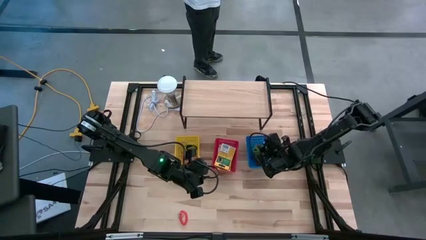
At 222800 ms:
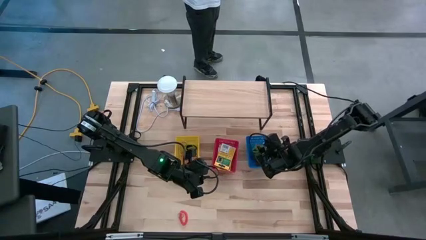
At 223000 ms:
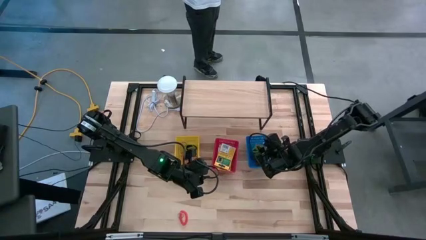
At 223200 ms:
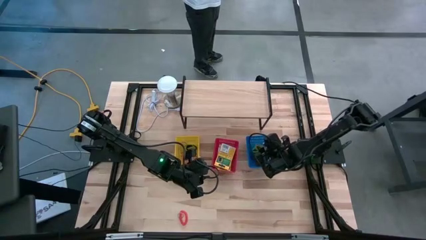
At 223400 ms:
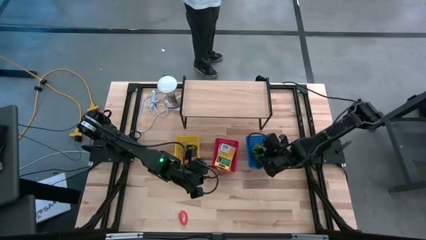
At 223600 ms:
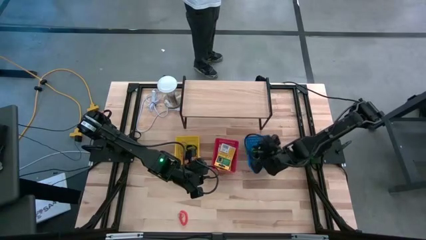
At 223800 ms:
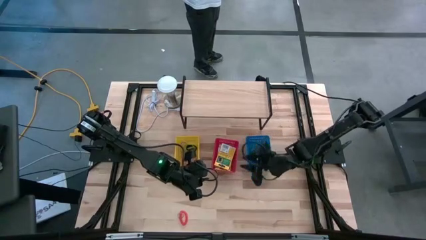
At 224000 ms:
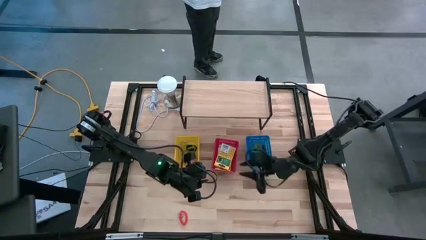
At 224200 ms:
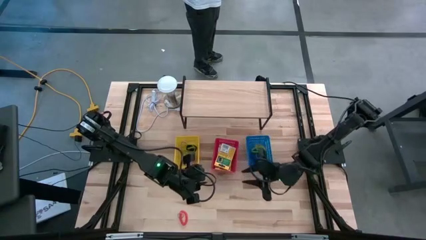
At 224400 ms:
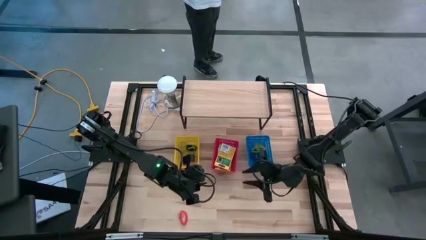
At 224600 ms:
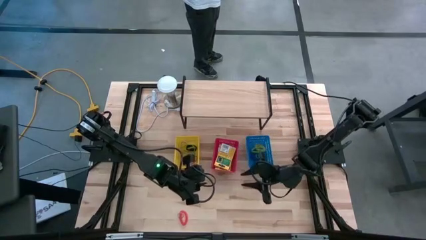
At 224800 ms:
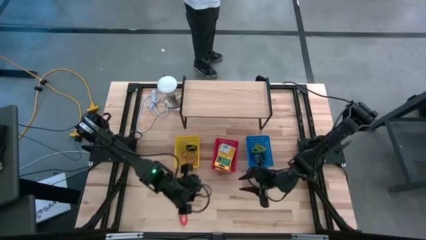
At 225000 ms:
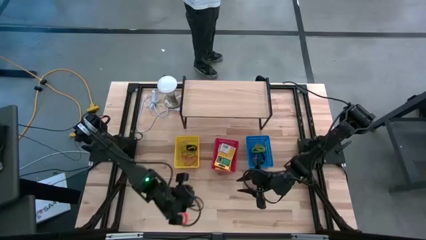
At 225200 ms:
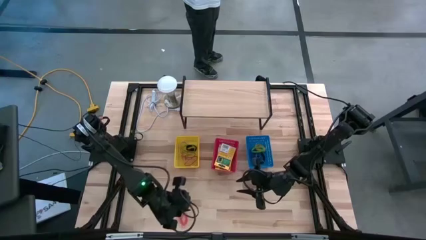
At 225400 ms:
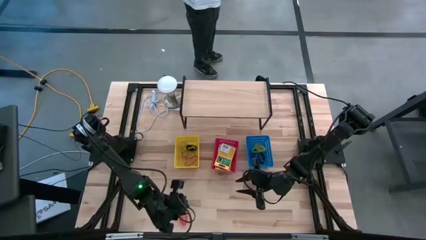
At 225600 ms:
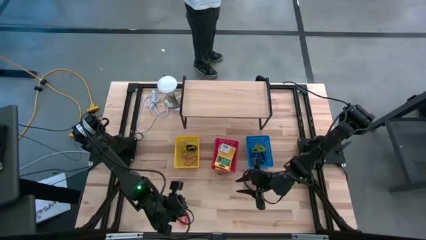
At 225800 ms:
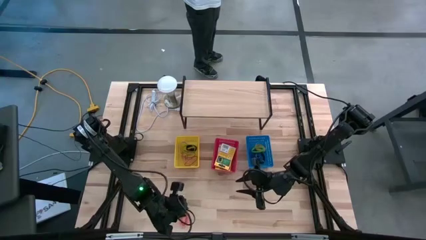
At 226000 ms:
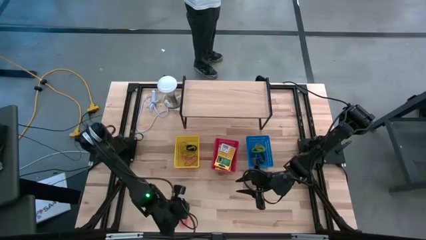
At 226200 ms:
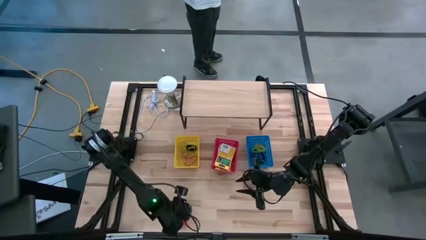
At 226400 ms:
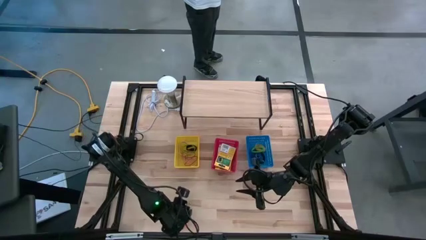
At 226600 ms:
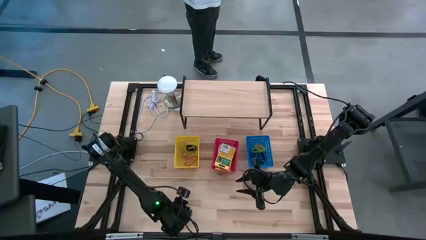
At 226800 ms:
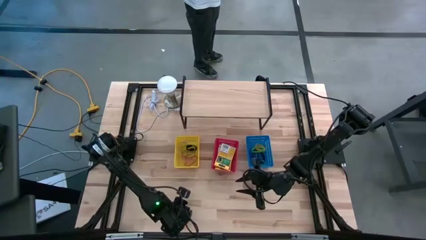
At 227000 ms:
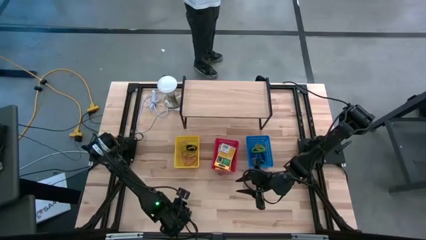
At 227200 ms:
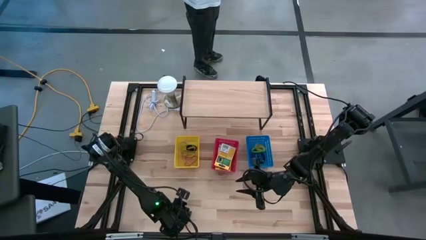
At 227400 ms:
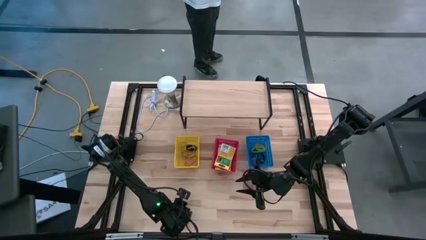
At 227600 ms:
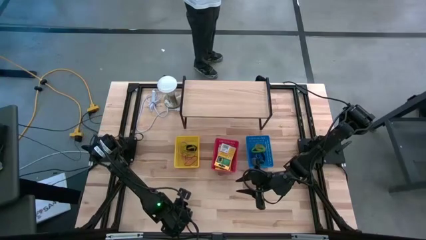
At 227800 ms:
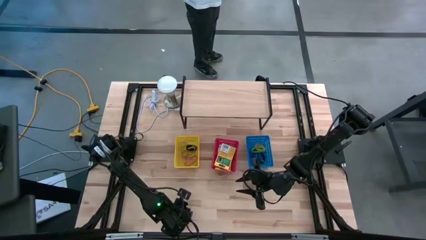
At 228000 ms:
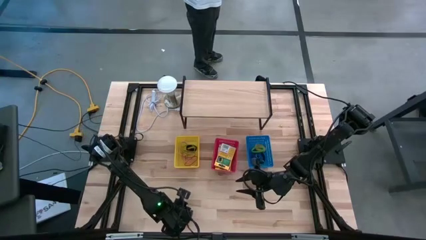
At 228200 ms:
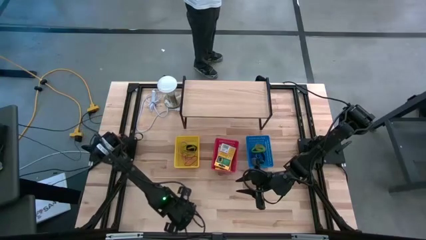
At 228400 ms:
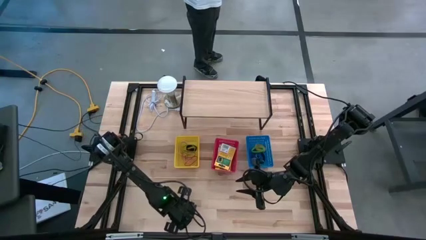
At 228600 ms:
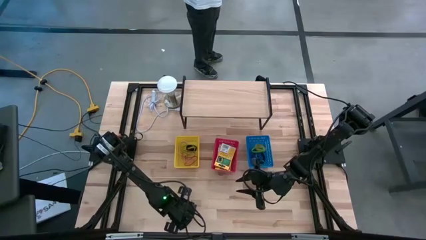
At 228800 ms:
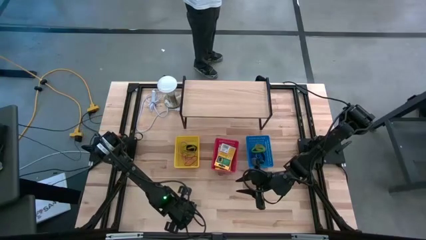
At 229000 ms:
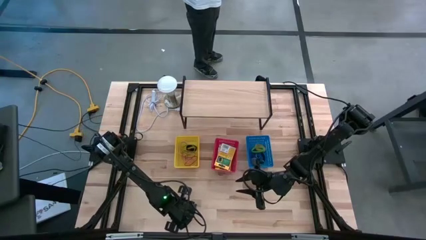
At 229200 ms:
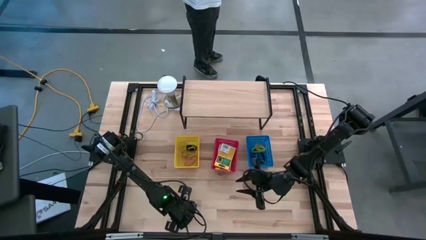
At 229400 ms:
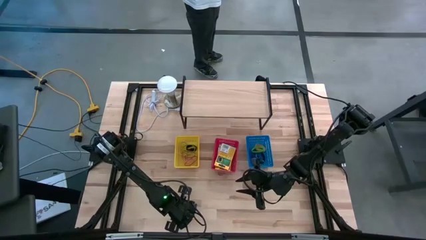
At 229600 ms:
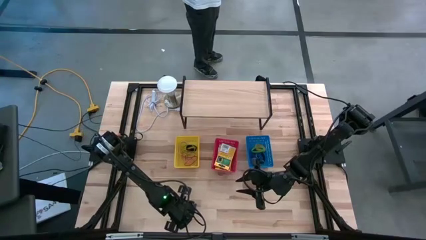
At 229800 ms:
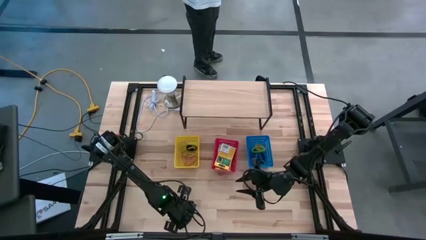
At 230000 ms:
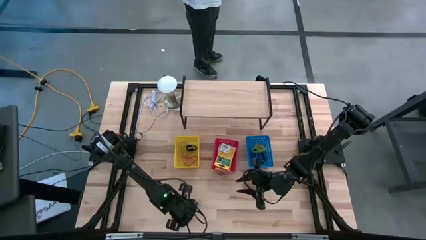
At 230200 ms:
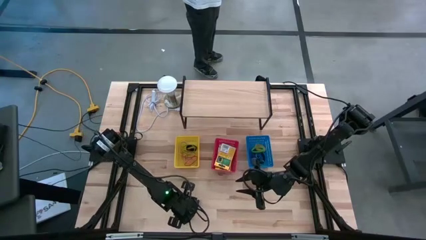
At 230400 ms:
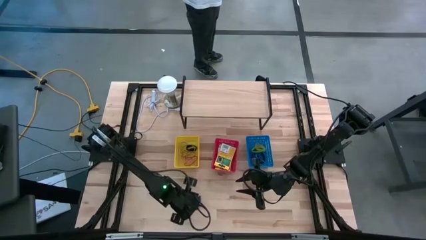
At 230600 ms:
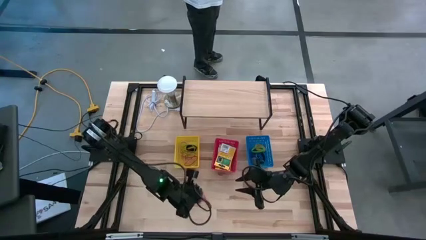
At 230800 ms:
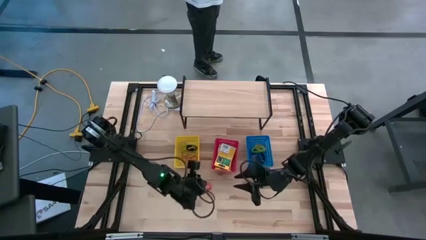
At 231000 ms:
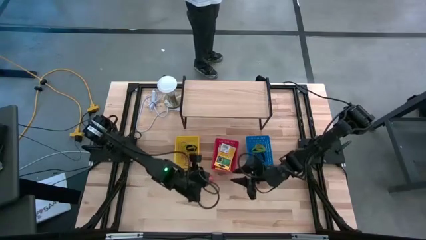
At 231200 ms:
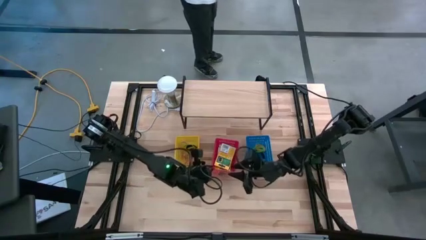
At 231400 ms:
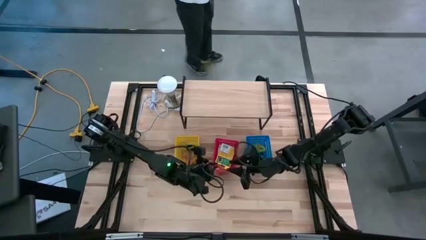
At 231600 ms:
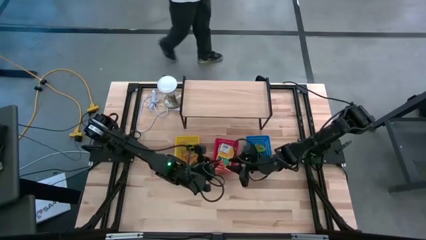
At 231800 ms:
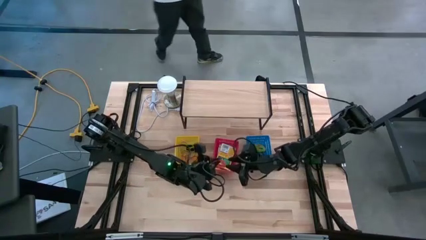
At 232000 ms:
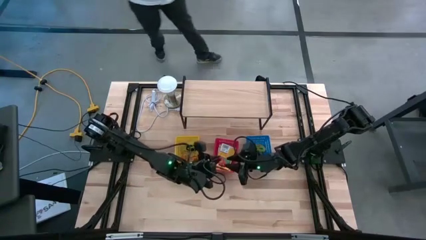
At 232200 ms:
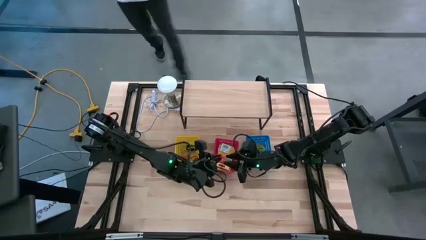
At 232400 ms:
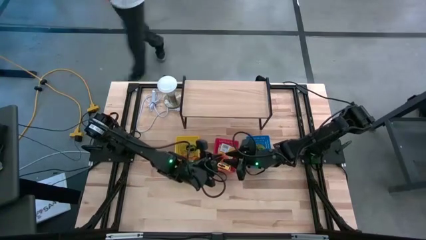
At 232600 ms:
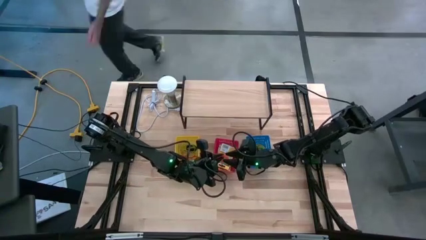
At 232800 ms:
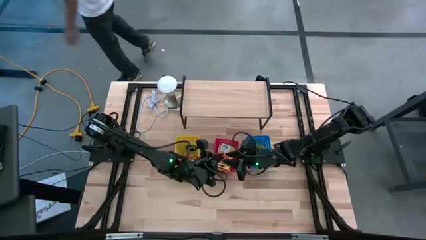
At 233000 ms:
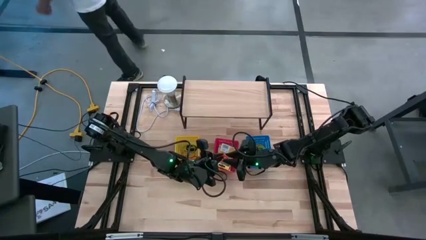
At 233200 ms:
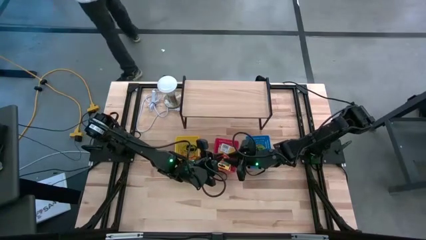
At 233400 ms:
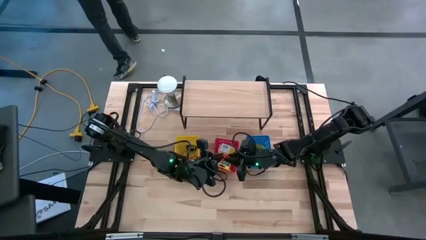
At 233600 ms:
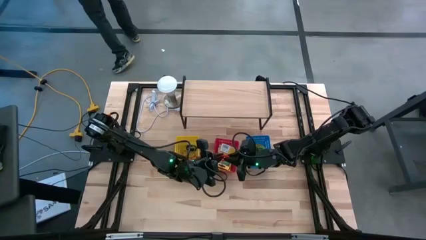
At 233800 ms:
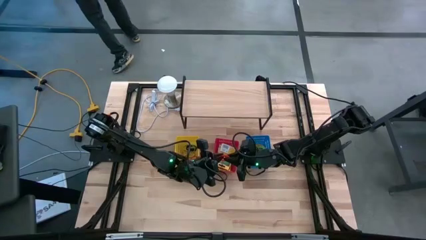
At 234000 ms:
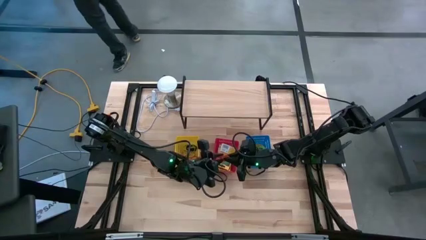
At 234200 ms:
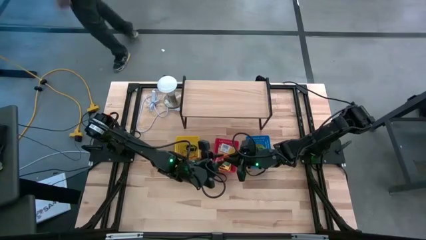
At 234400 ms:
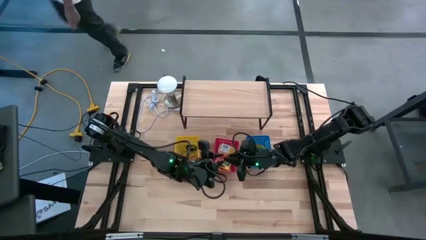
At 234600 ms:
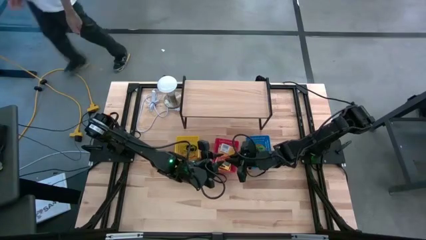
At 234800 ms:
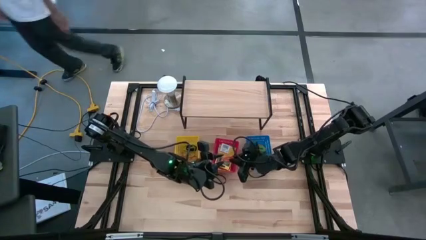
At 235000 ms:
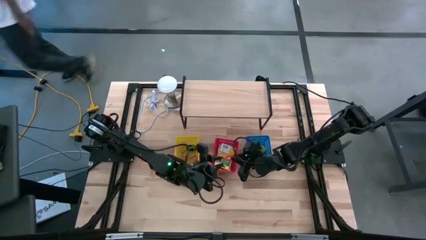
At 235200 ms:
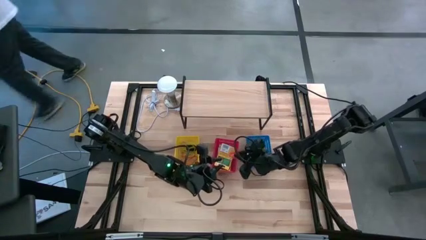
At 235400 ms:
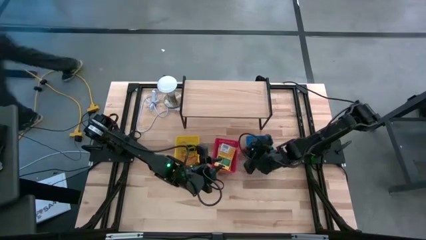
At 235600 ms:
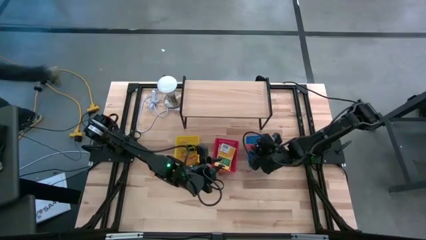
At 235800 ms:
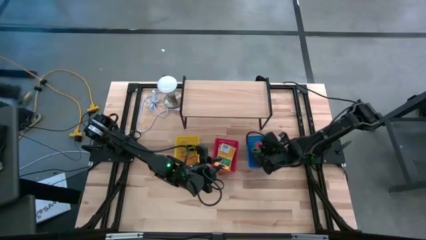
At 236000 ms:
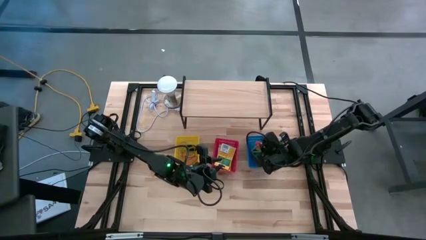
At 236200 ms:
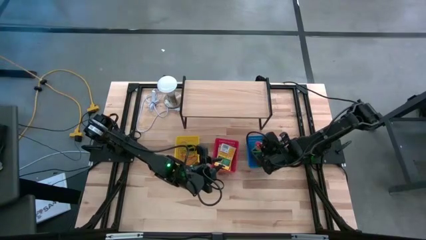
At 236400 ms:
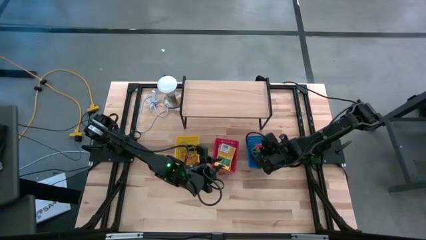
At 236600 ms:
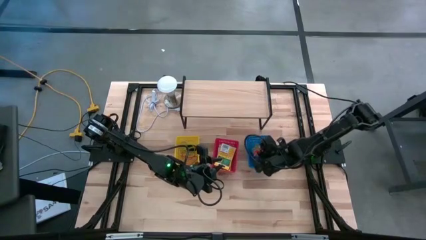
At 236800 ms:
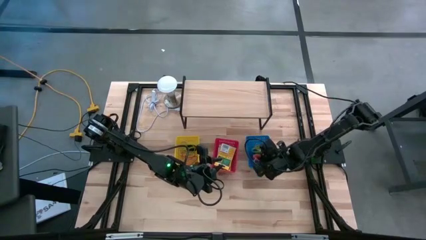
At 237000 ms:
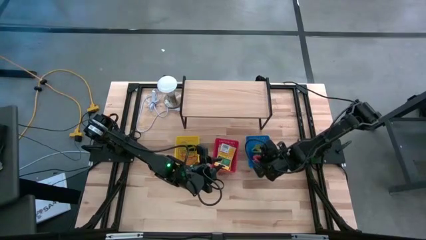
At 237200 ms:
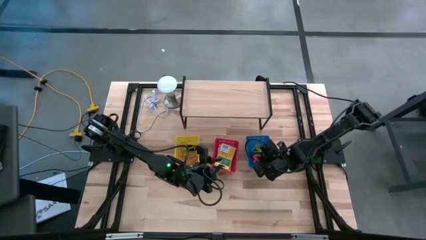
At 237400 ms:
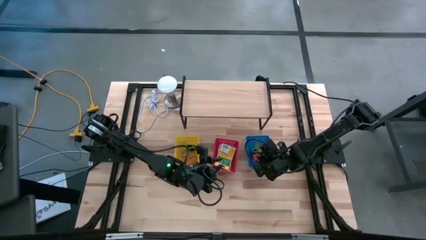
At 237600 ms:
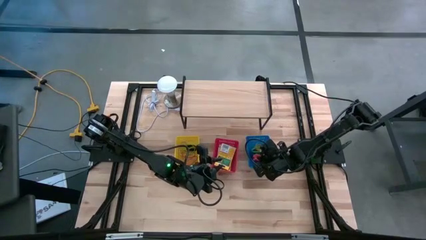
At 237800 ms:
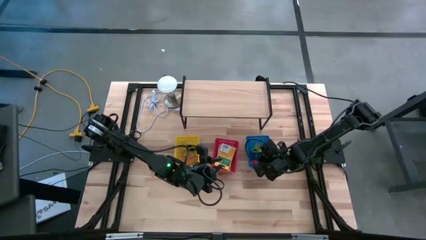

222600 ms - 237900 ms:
Task: Pick & Place Office Desk Supplies
Put the red spiral keychain into the blue bin
